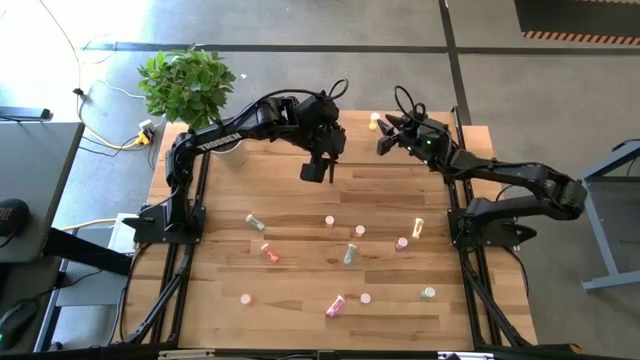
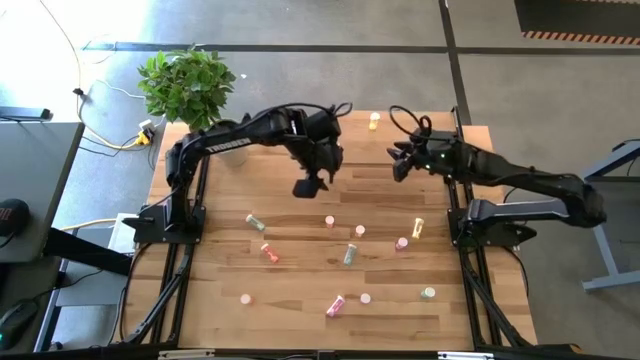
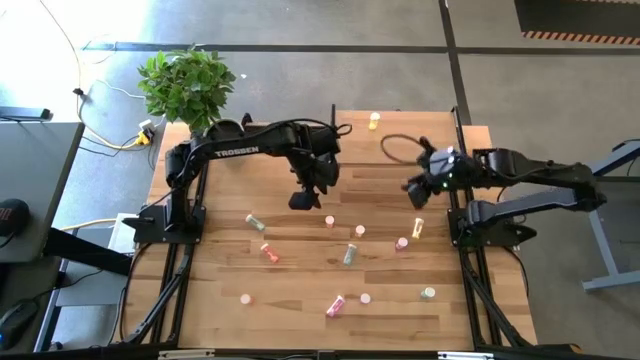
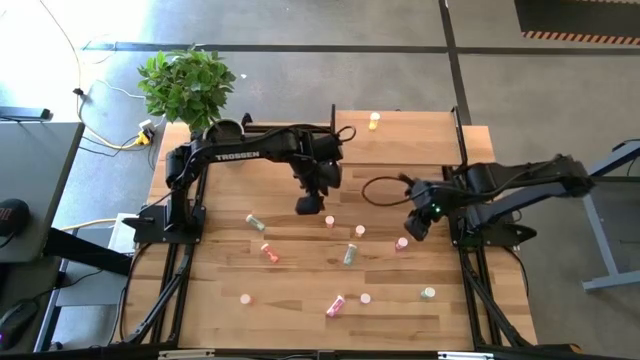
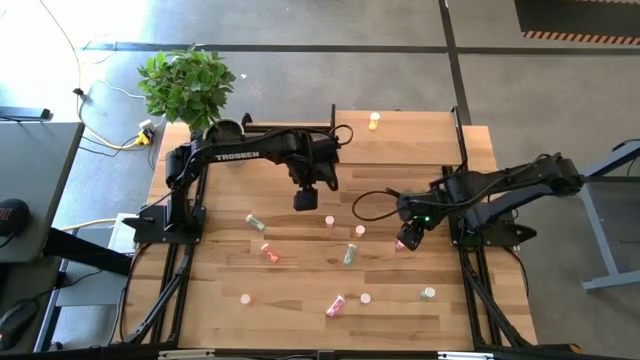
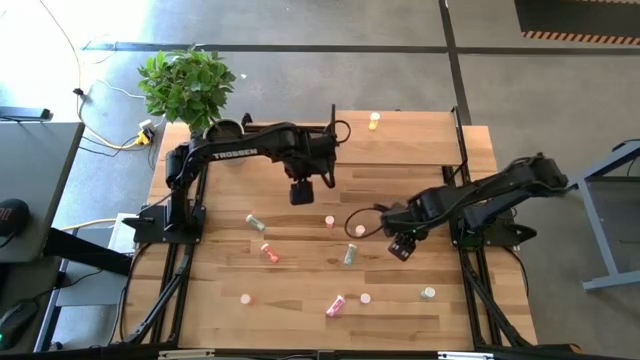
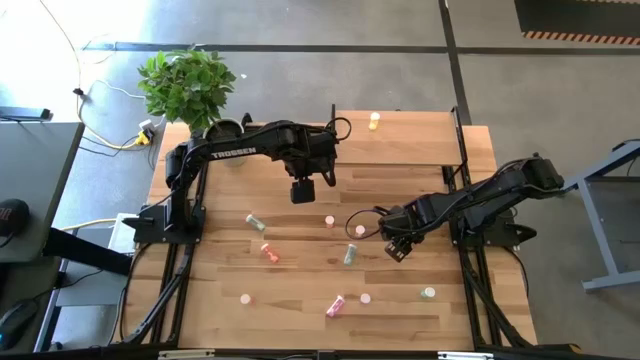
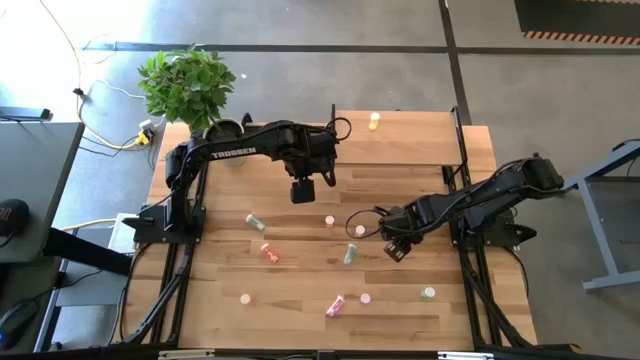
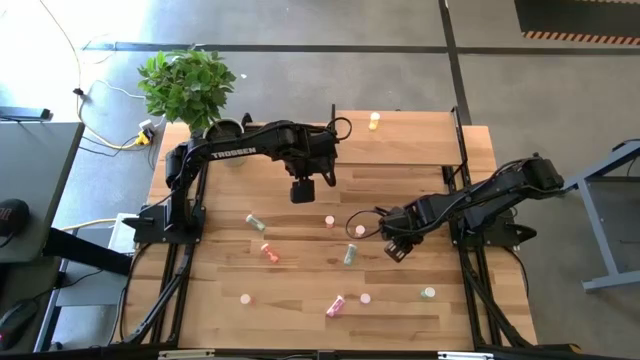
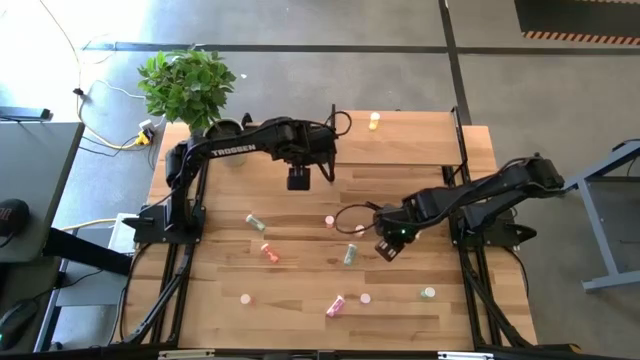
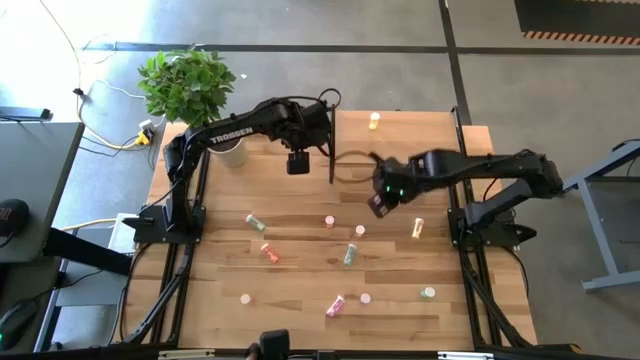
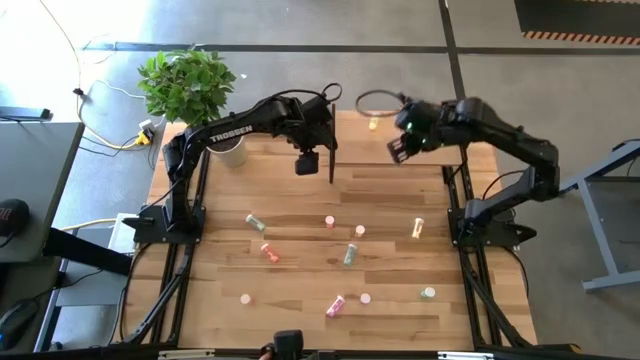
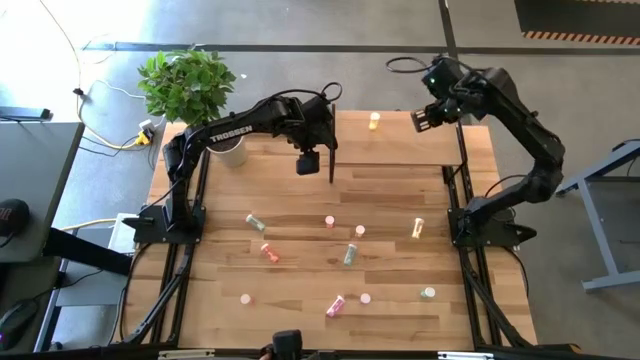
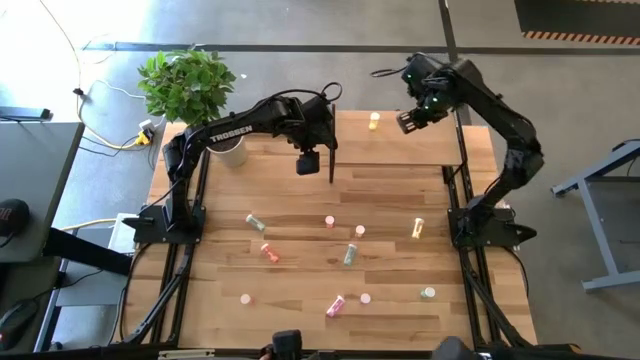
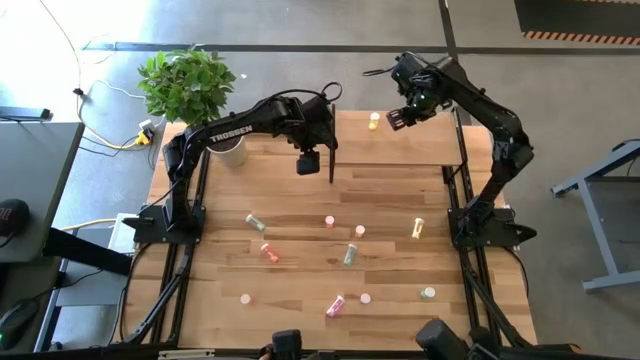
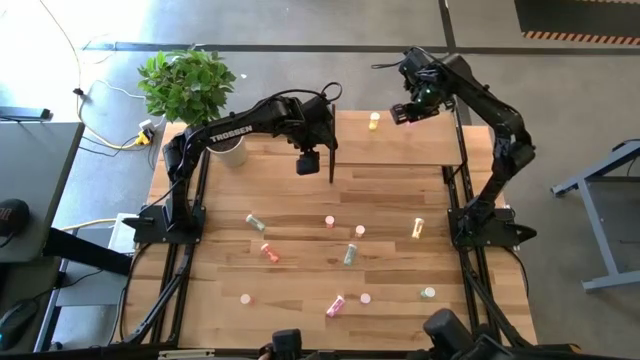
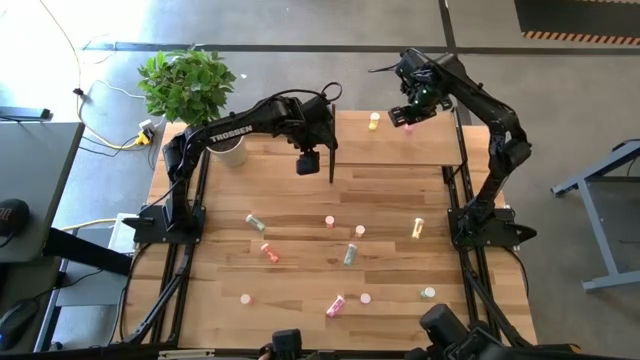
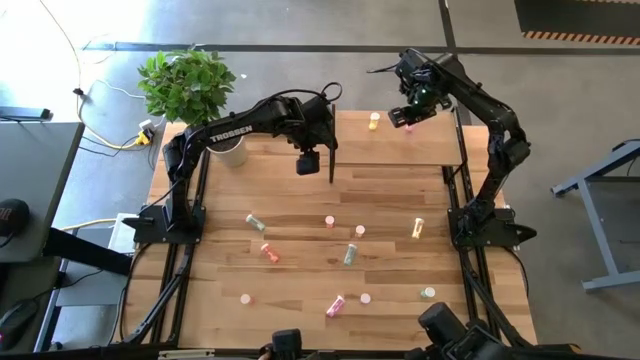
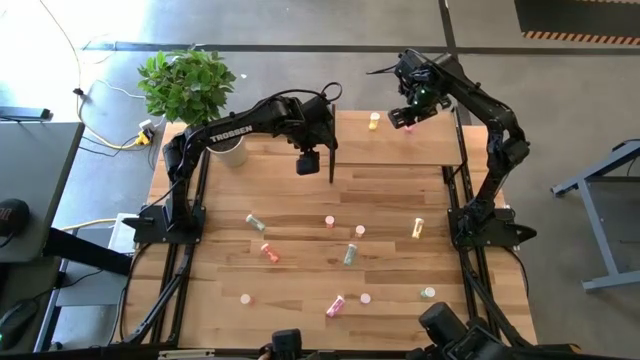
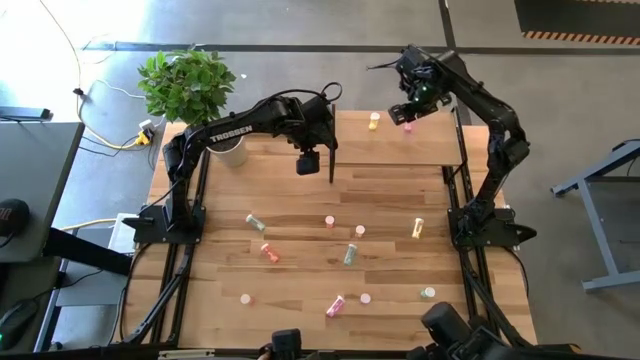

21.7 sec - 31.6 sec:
Task: Pick and place medicine bottles onto shelf by color
Put the top violet medicine bottle on the shelf

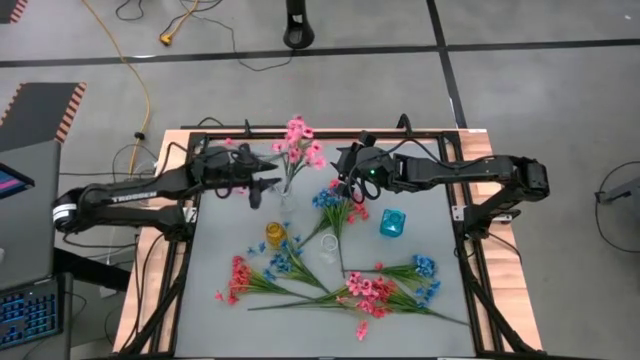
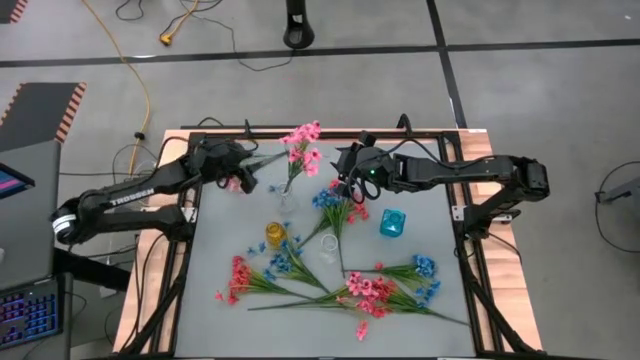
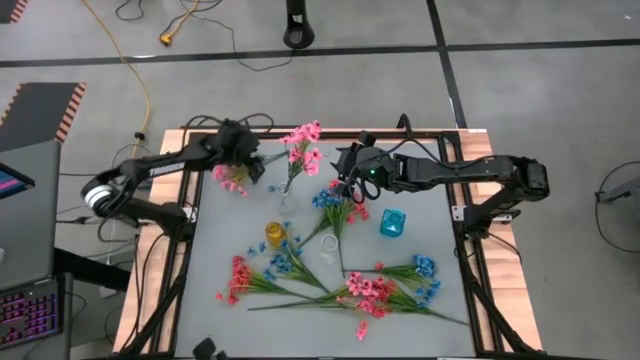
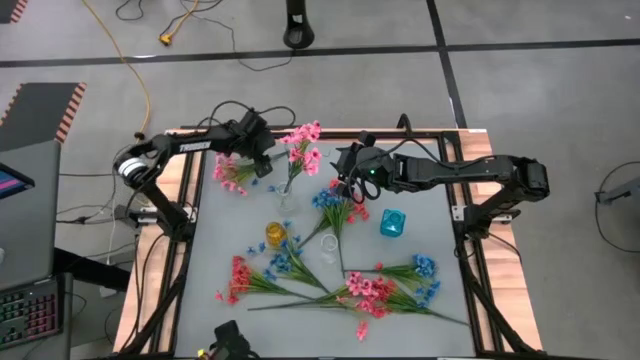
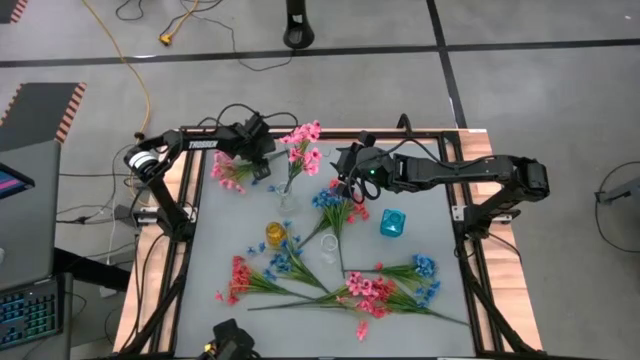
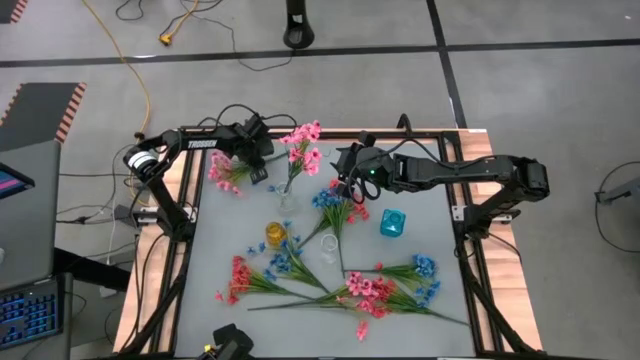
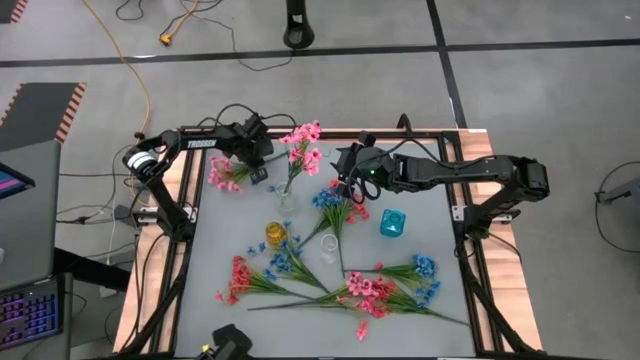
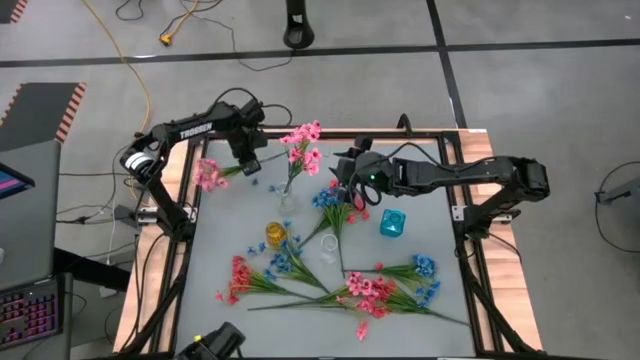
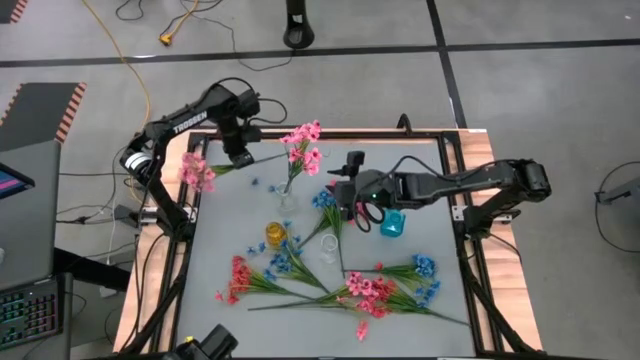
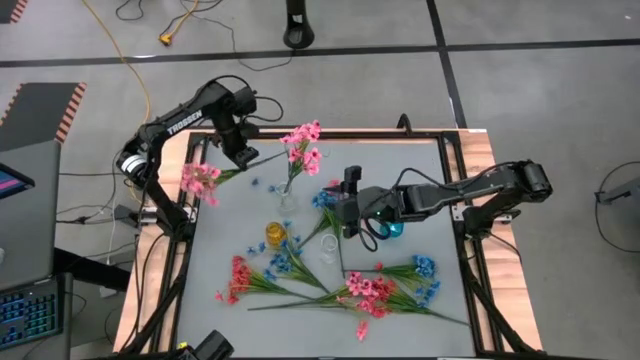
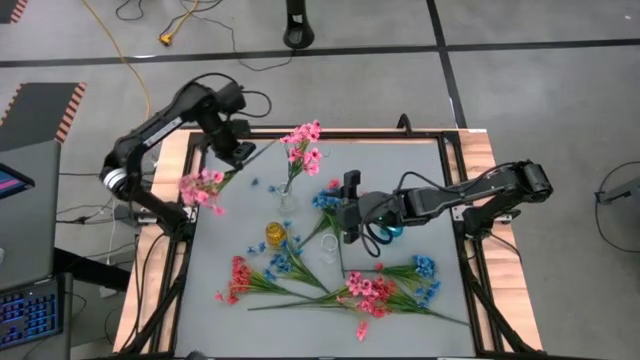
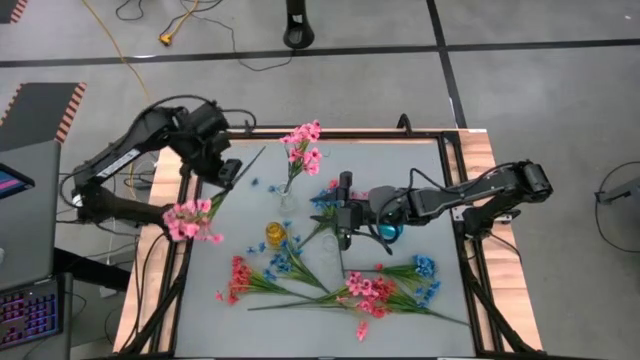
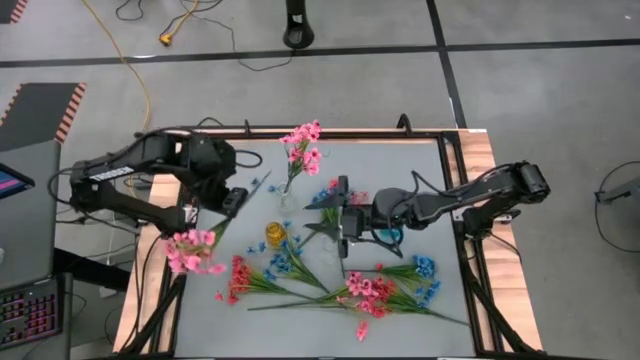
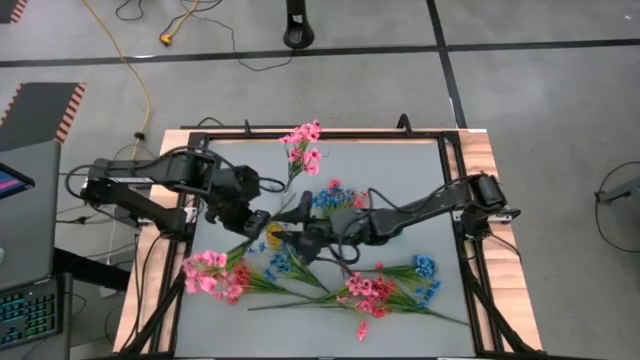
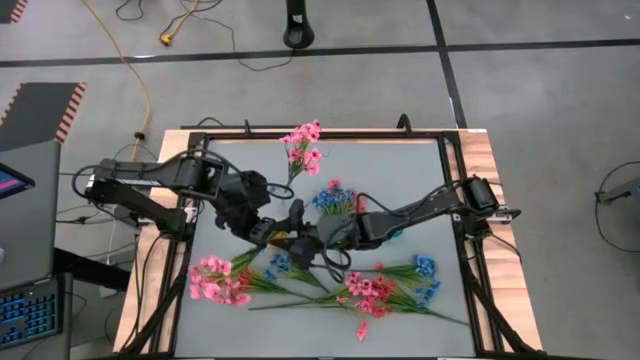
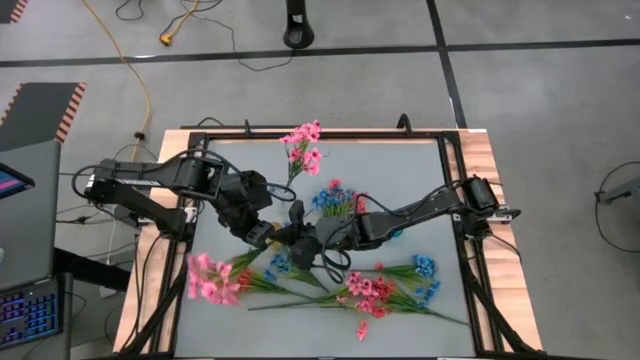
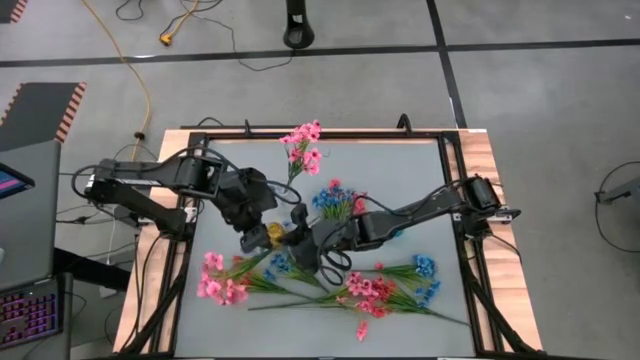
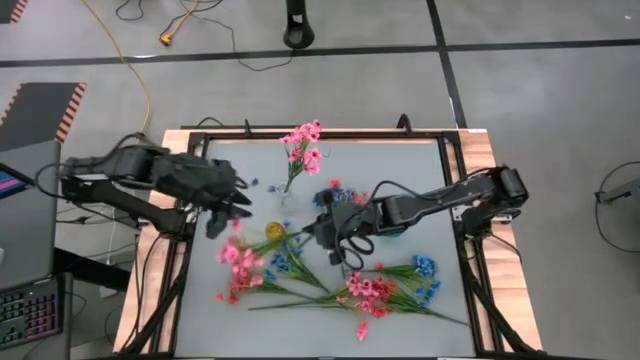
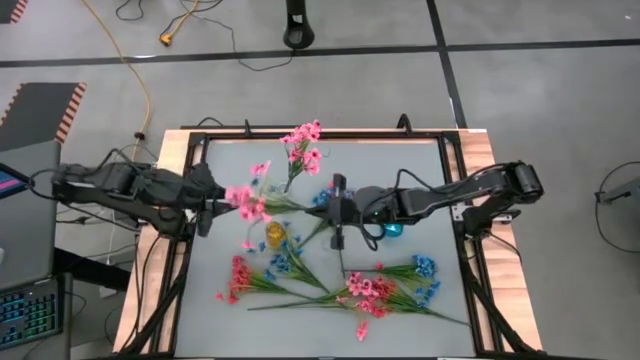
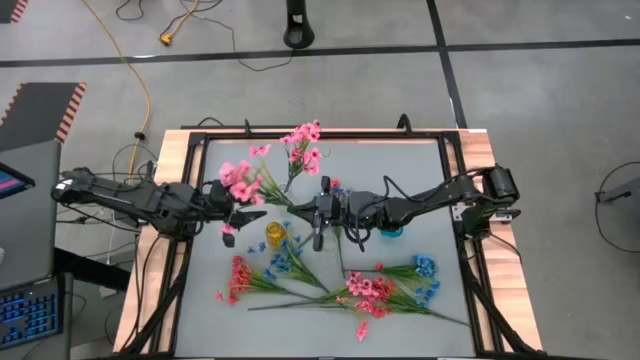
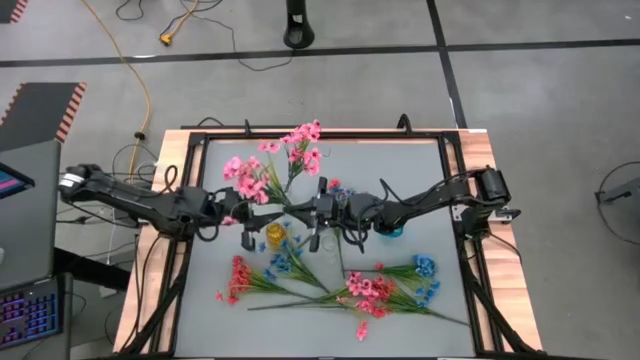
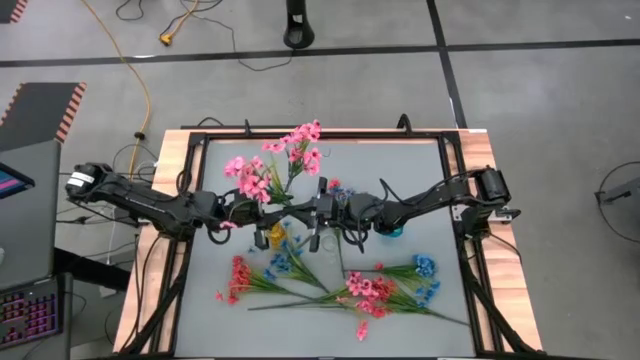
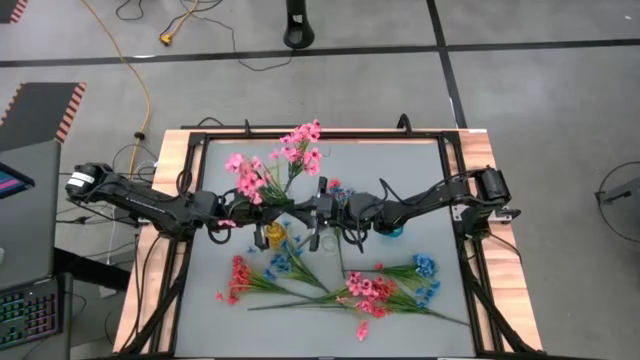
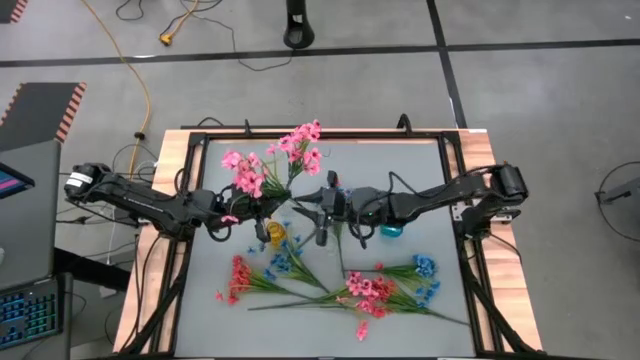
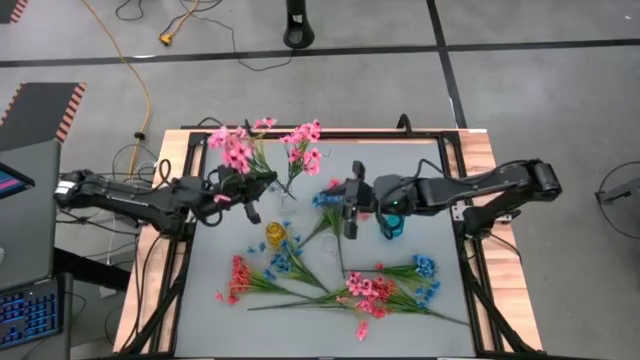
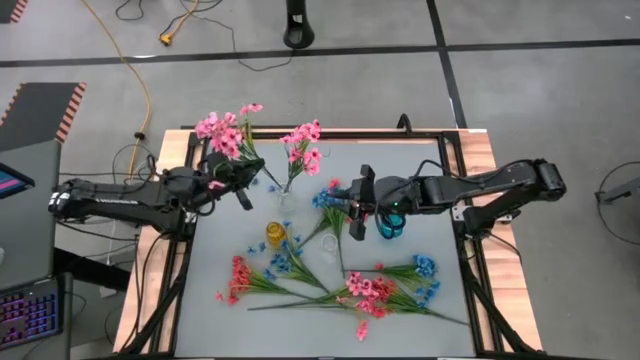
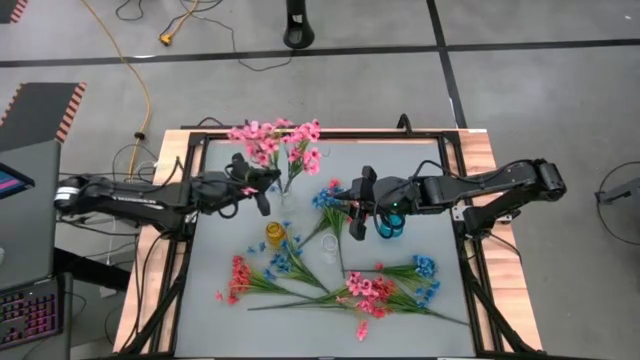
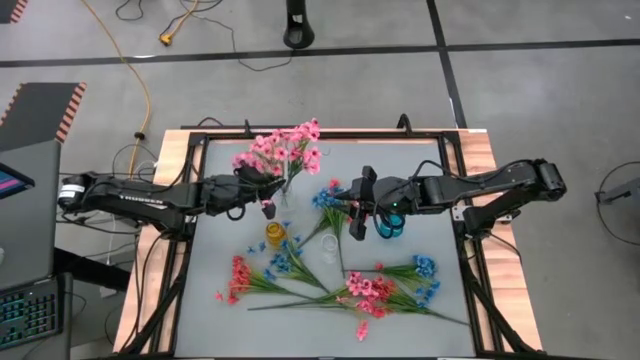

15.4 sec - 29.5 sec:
Task: Sort flowers into vase by color
Put the top pink flowers into the top transparent vase
